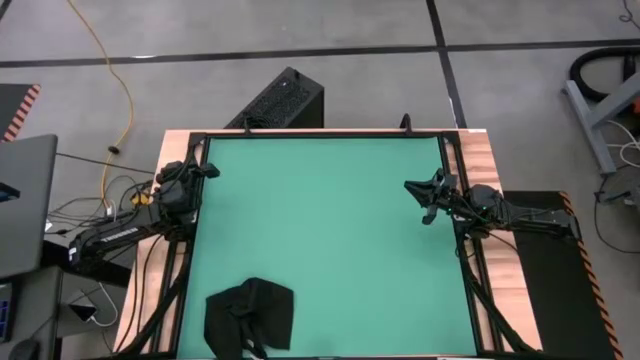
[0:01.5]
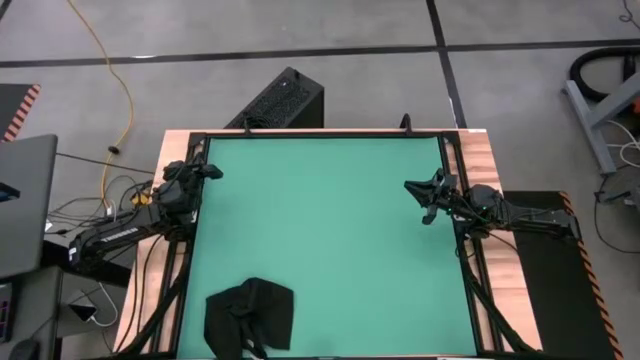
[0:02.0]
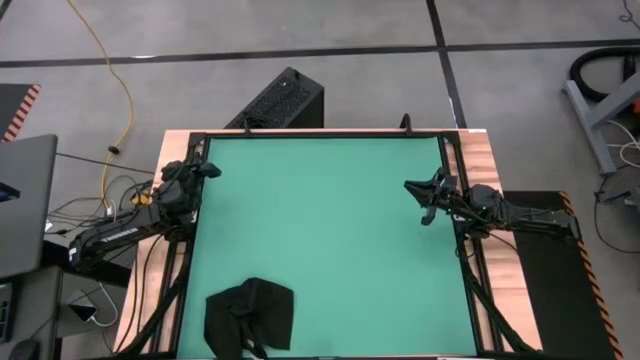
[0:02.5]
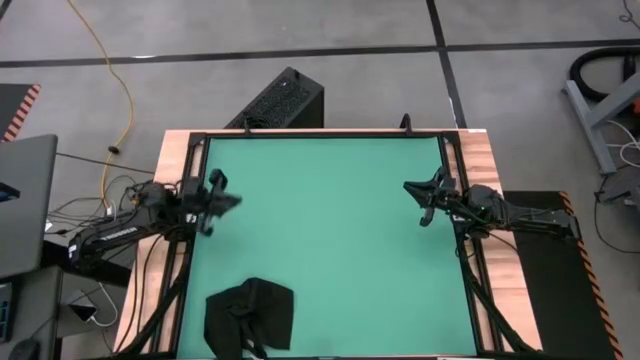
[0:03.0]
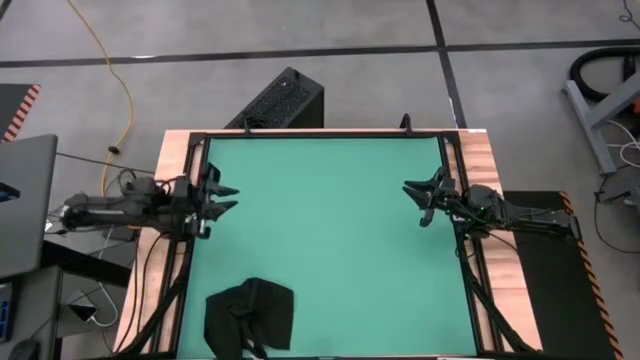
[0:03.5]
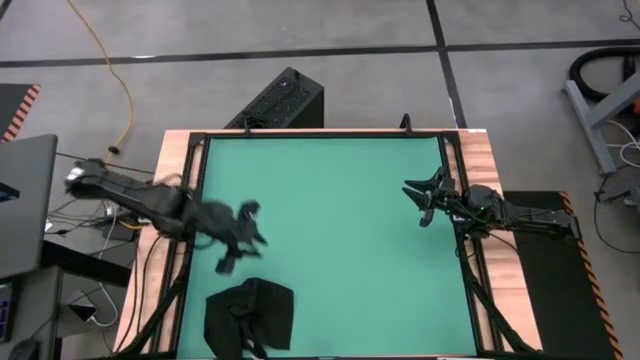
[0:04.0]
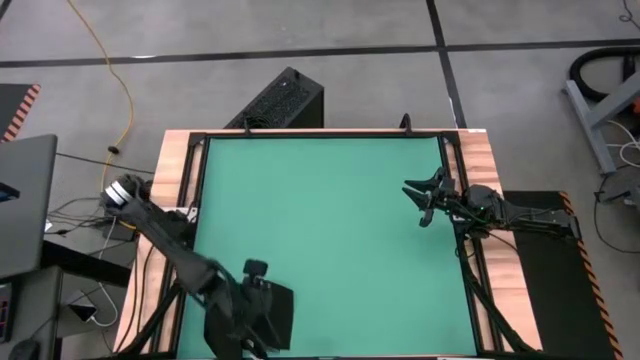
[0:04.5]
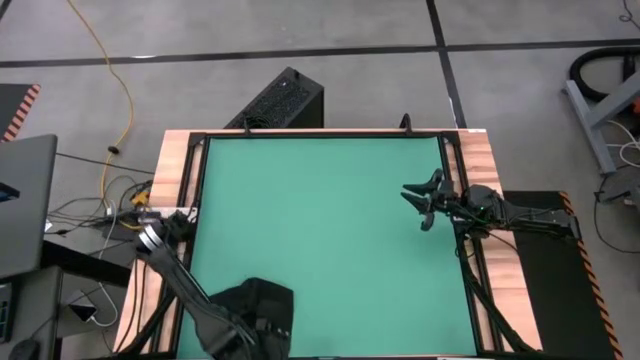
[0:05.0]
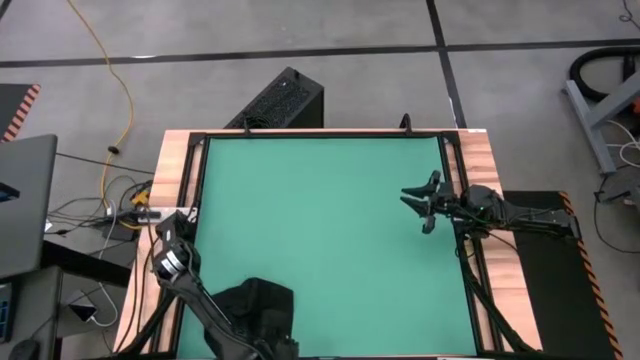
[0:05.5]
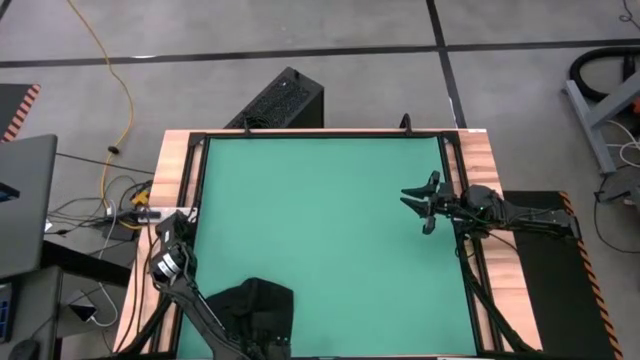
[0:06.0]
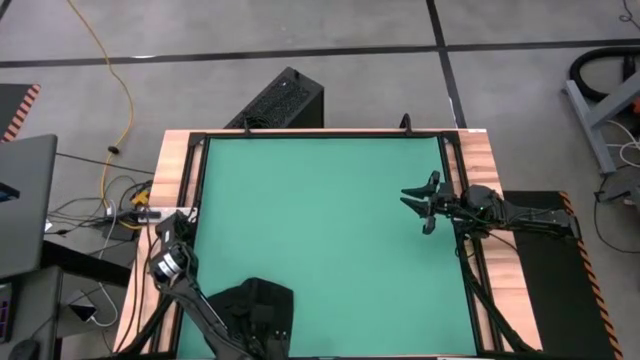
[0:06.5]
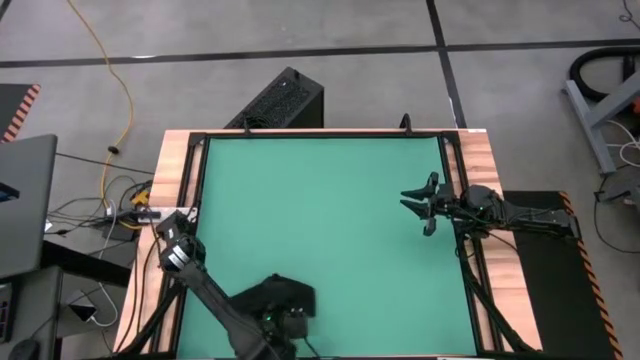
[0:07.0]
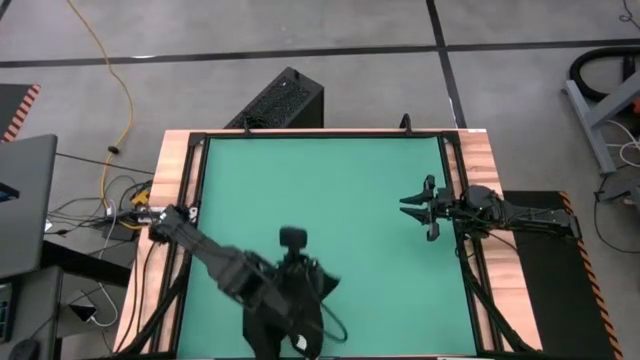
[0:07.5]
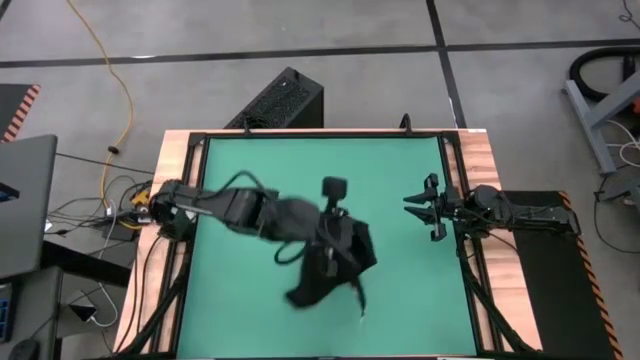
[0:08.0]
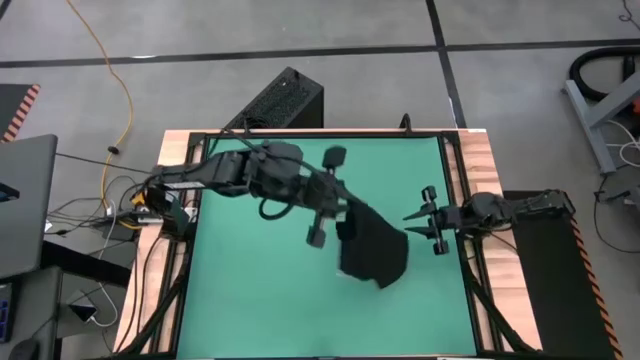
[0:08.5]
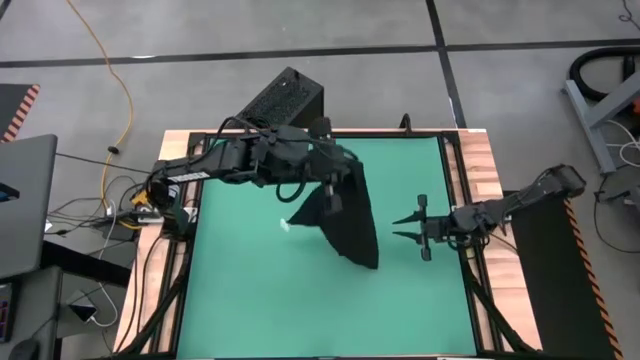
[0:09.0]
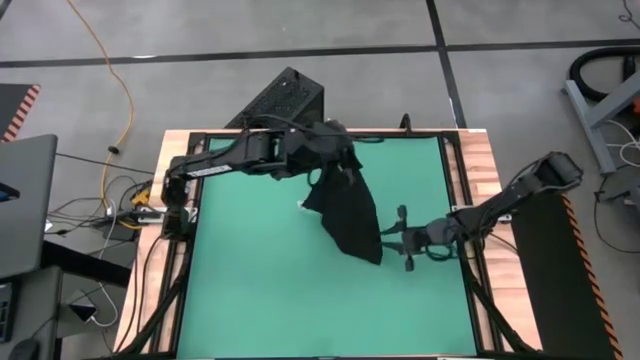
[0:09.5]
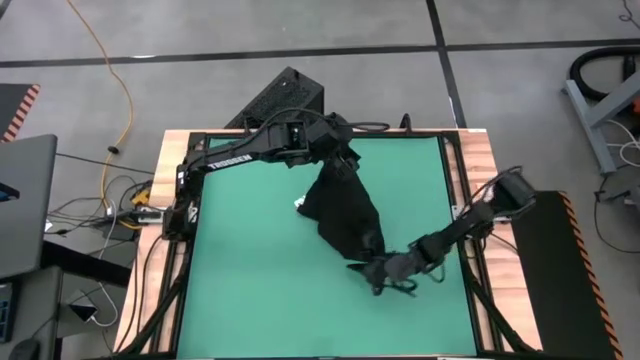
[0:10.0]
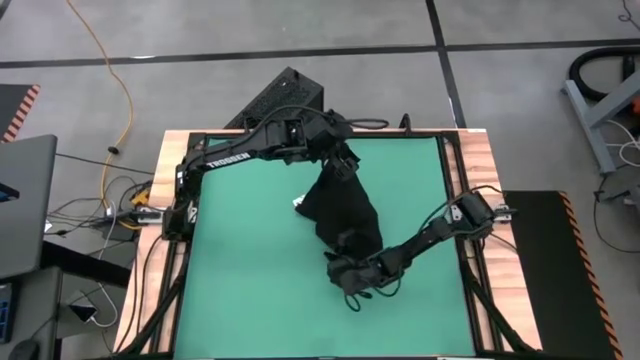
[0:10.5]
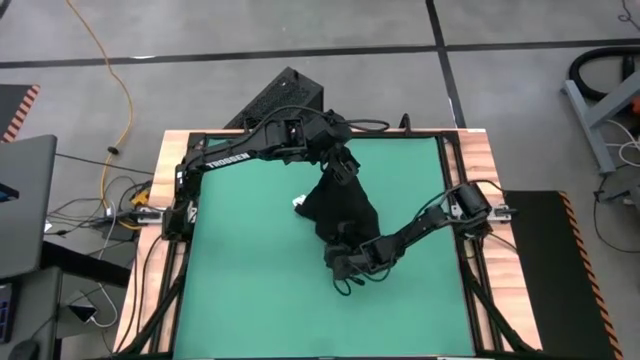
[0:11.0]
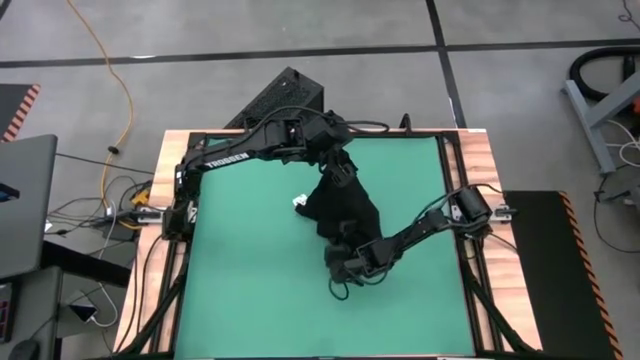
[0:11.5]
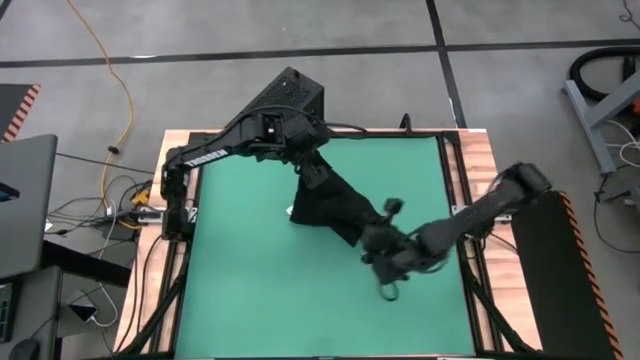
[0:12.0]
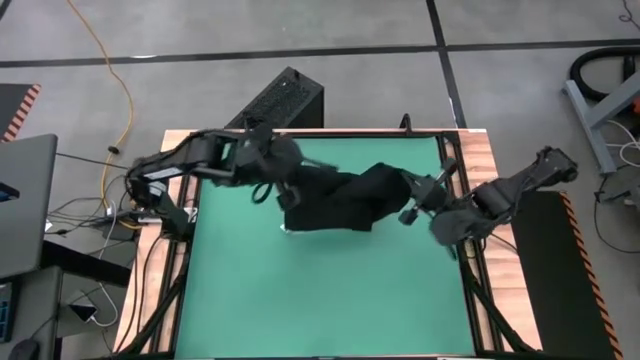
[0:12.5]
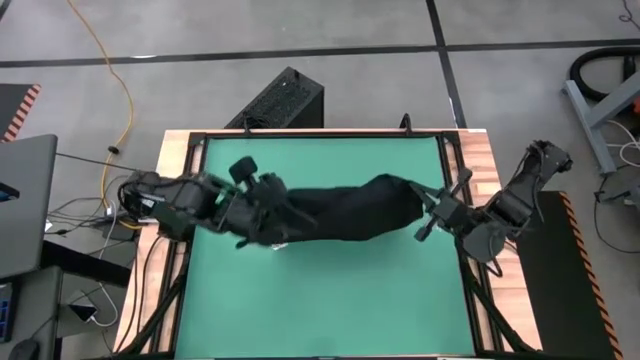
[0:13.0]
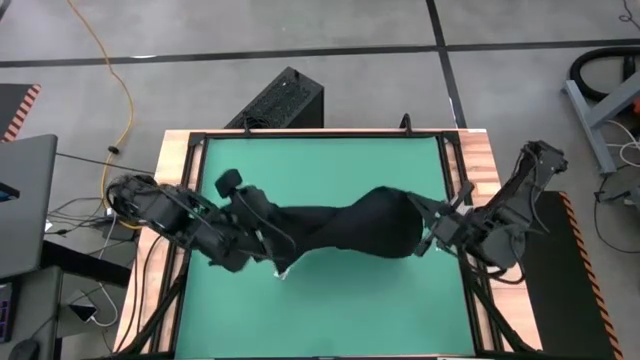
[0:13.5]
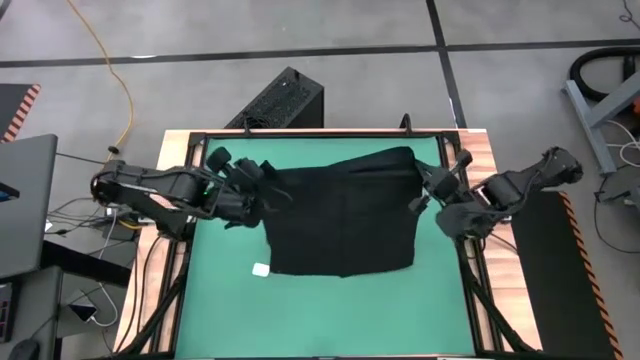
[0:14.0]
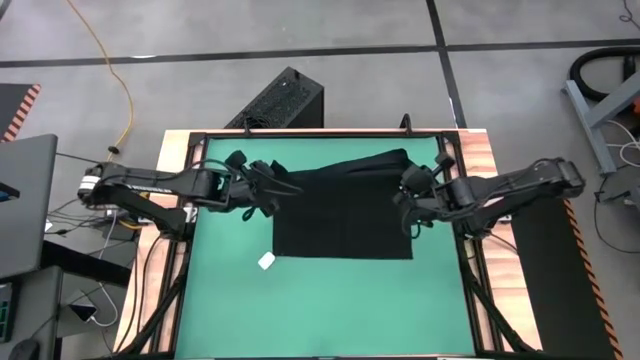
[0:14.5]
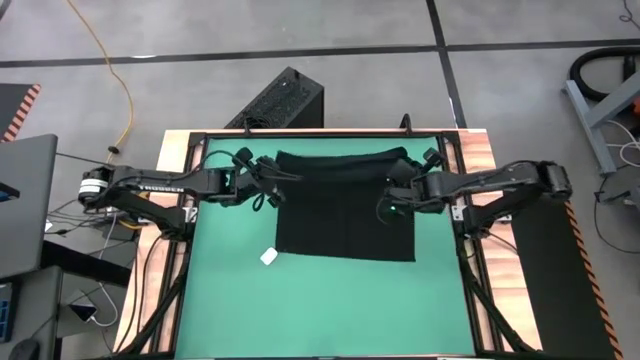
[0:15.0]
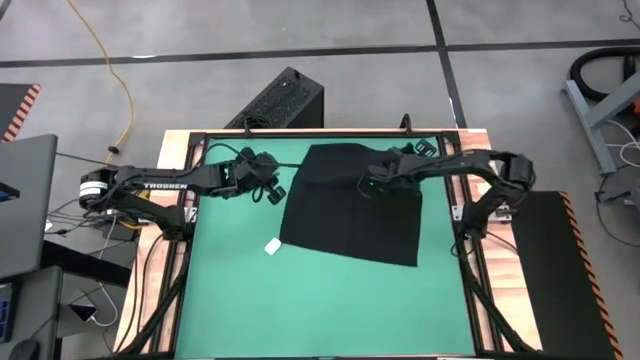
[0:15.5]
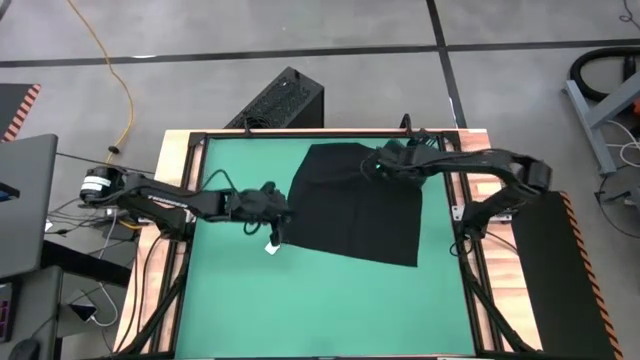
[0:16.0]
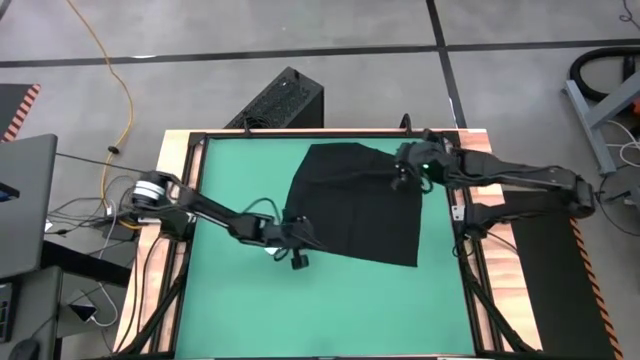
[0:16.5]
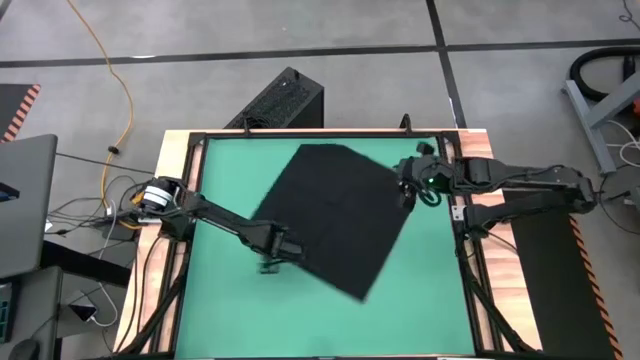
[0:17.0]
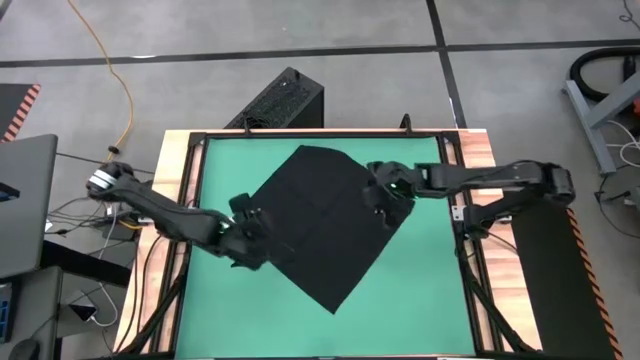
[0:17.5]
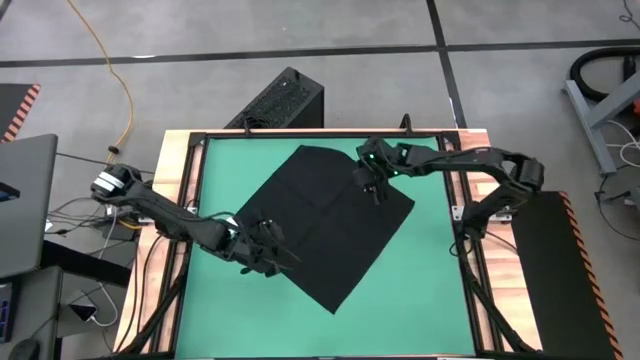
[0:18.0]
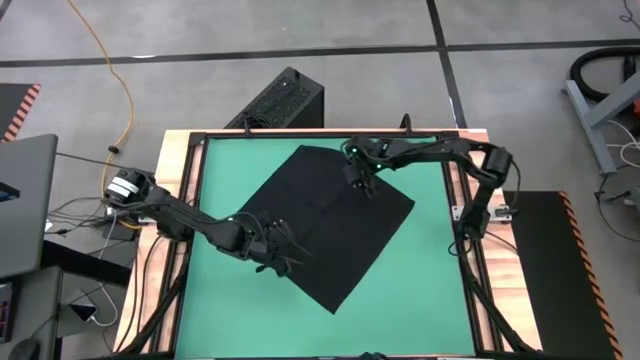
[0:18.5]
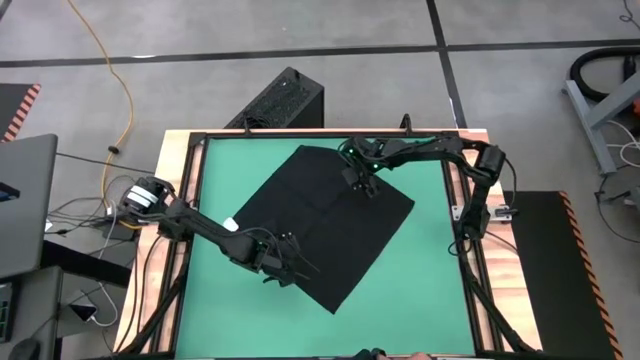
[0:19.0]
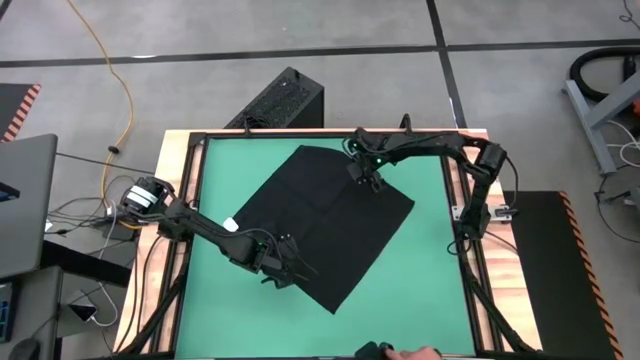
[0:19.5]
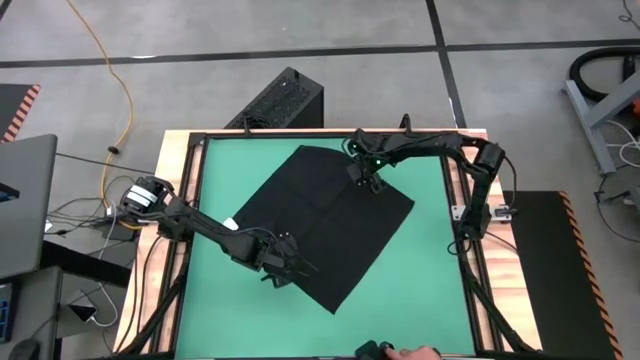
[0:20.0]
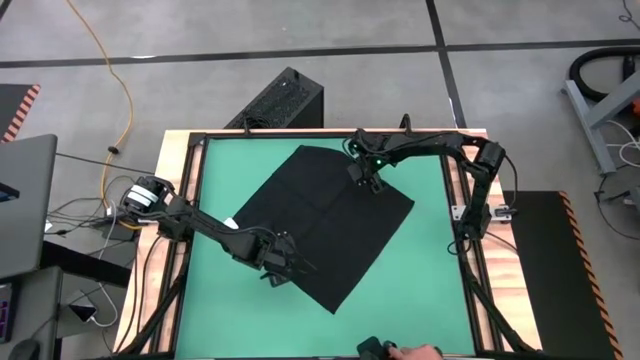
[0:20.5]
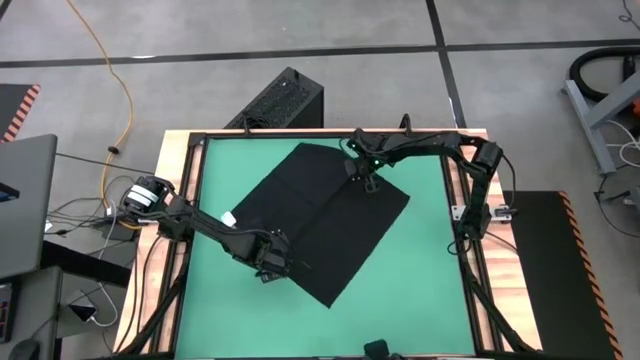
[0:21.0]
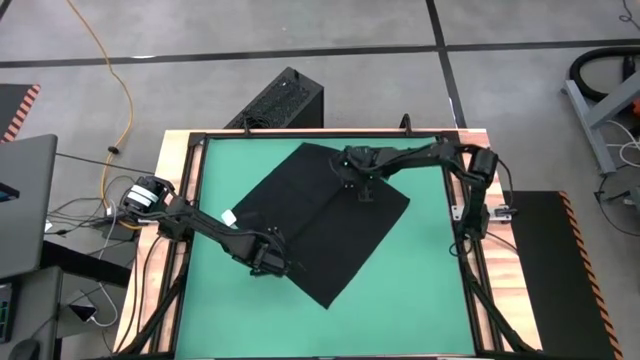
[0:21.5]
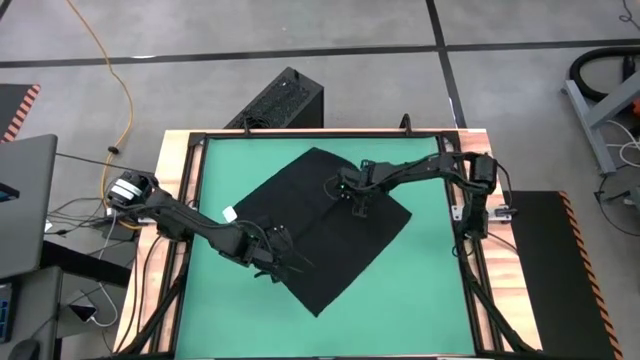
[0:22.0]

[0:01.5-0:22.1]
Task: Roll towel
Fold the black towel
